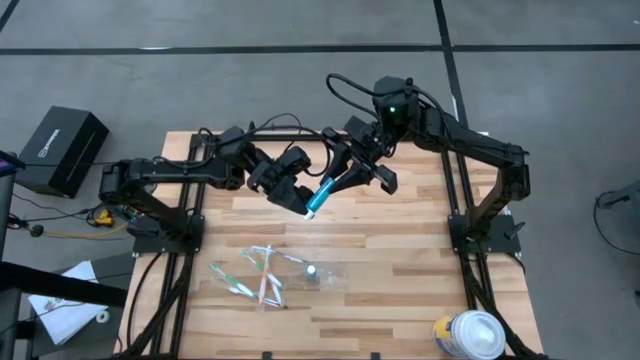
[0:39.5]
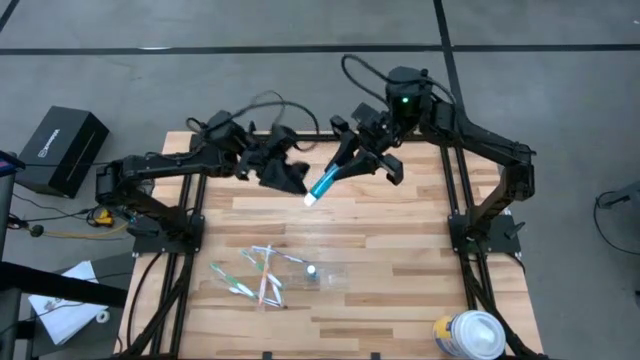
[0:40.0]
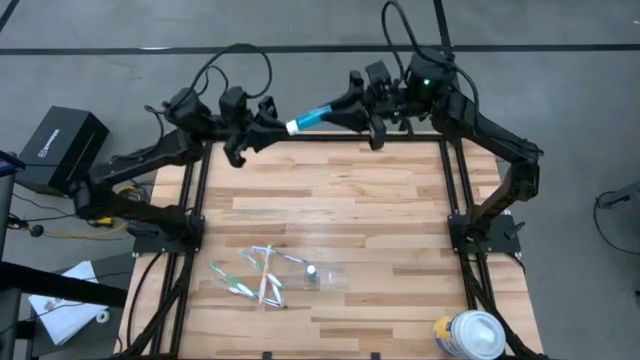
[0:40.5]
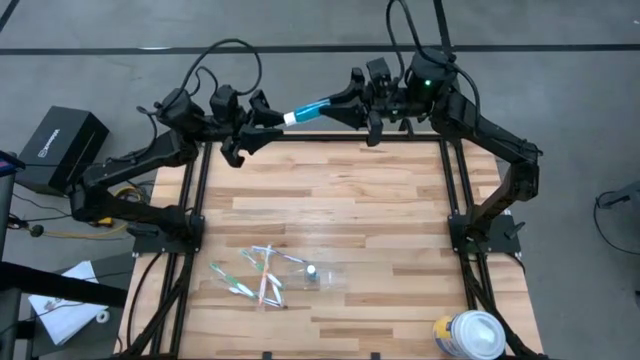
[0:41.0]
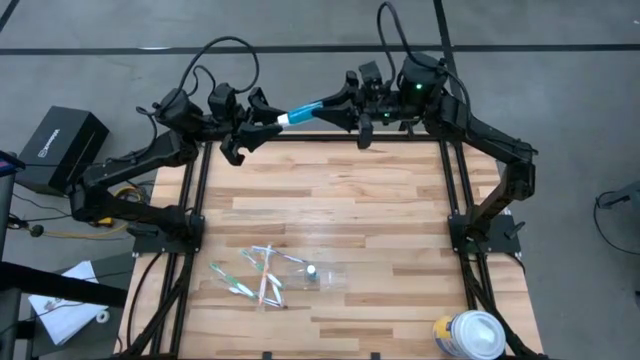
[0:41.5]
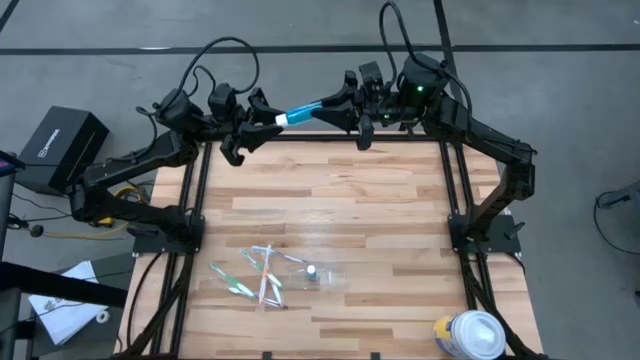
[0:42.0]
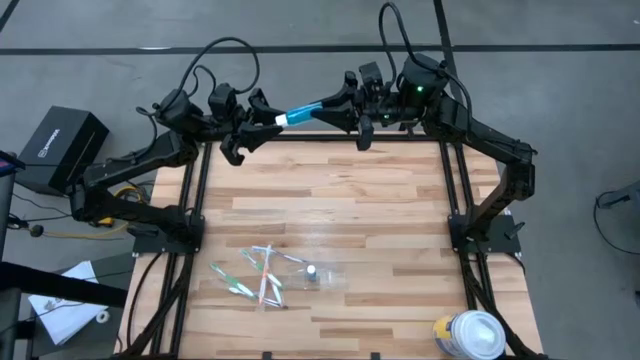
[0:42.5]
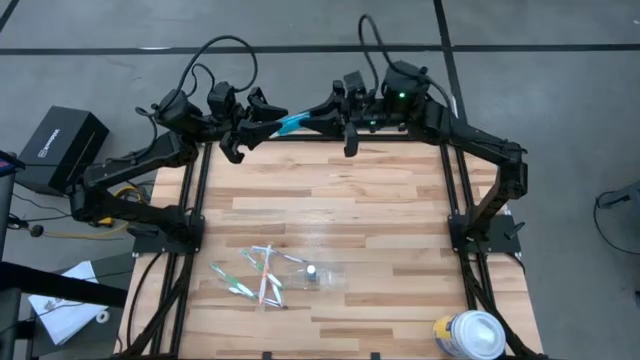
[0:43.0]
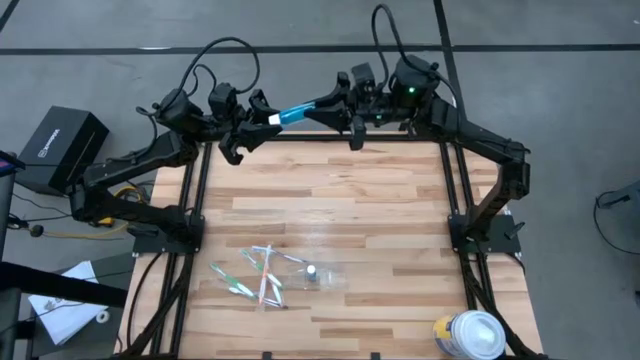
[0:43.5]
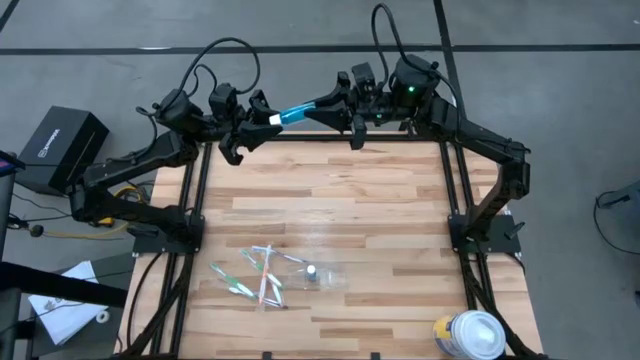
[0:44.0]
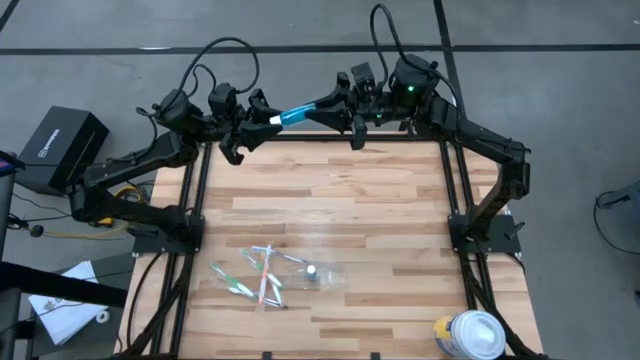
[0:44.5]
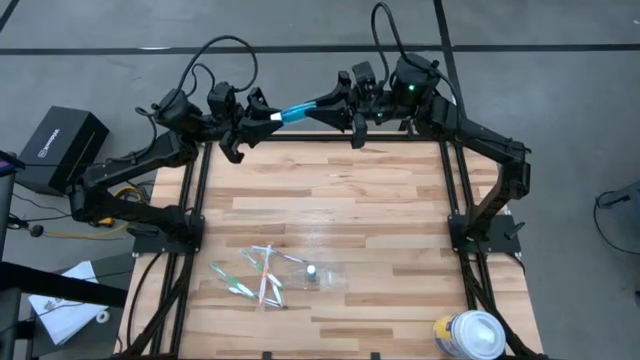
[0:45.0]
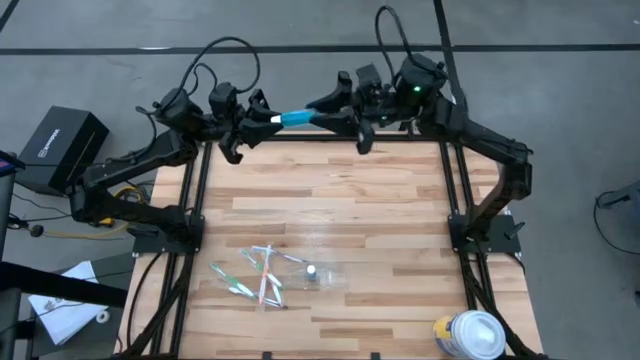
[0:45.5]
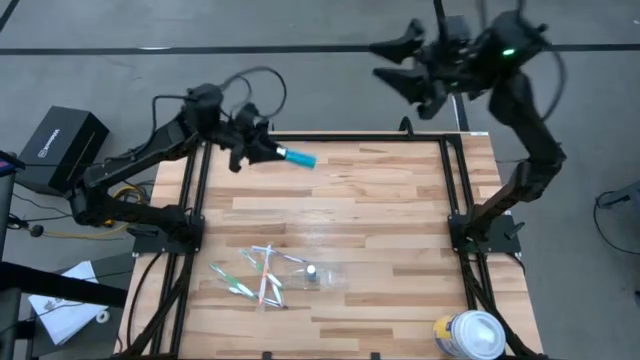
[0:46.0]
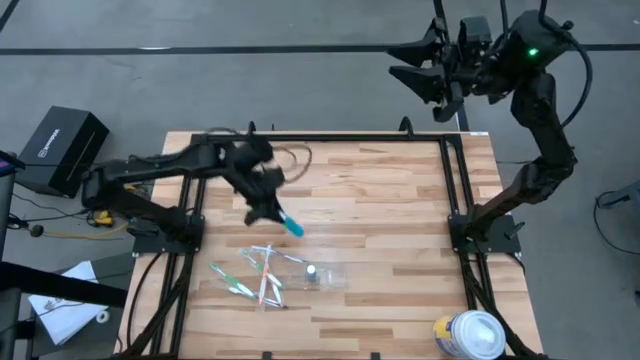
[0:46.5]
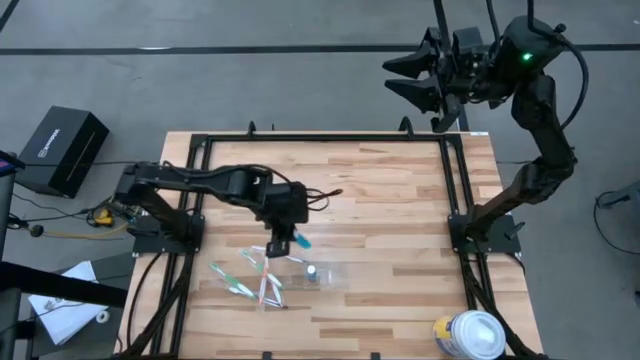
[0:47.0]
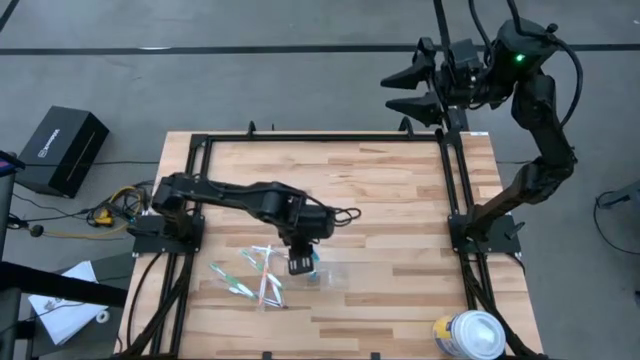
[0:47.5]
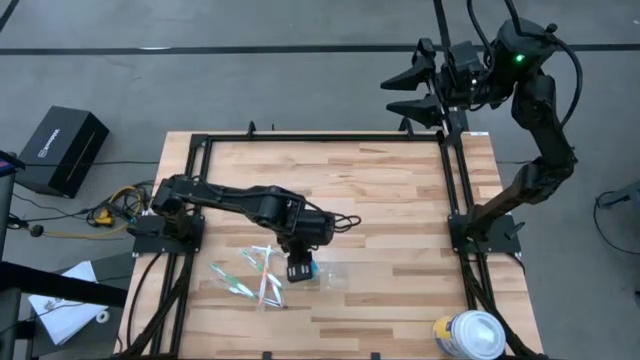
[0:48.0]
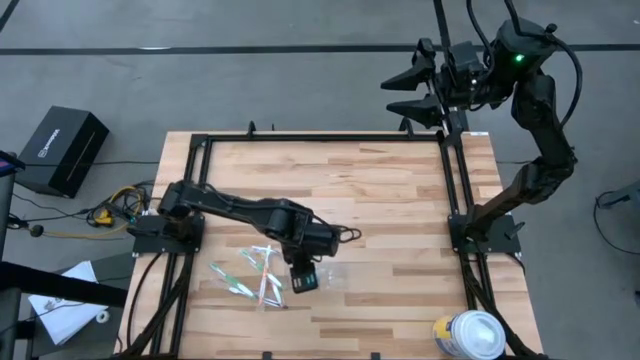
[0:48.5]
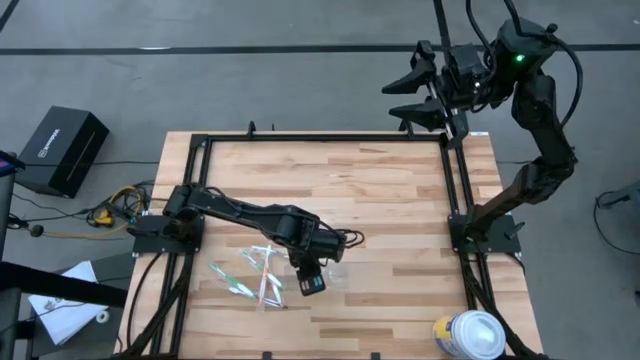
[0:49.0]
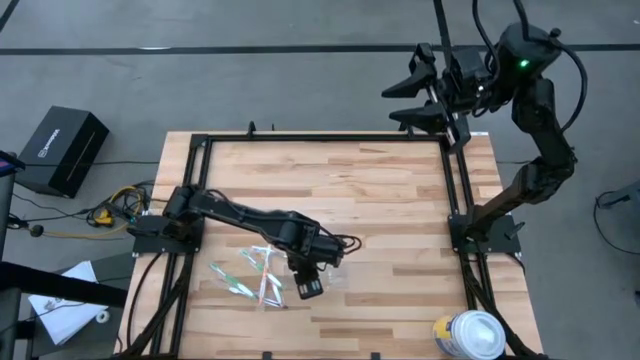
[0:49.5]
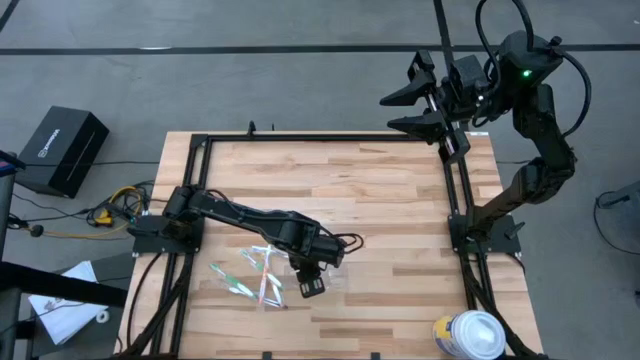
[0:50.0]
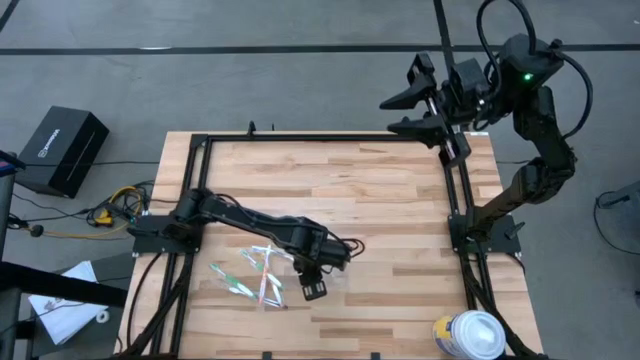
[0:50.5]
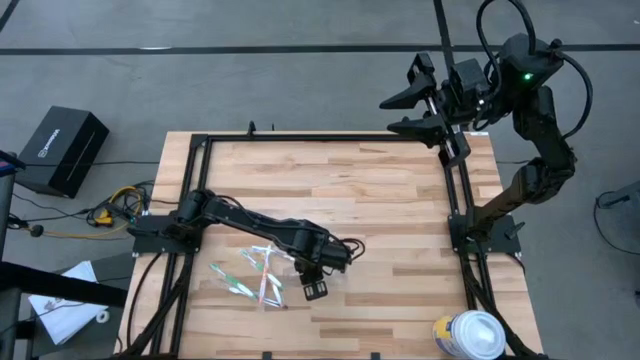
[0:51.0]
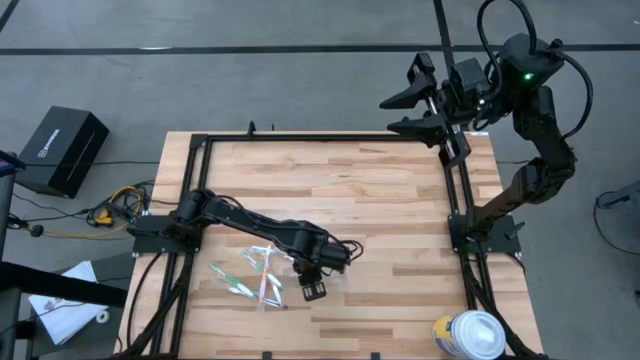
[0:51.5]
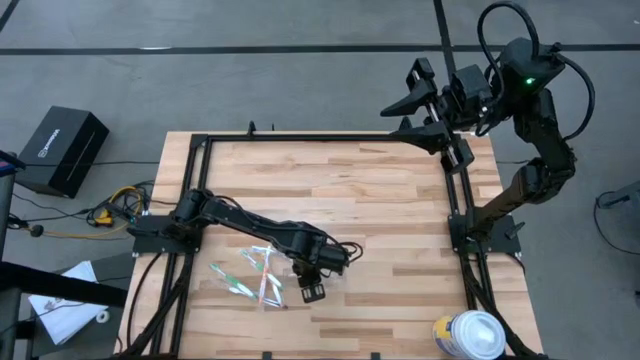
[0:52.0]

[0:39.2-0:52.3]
Task: Pick & Place toothbrushing station
Put the blue mouthwash into the transparent organizer

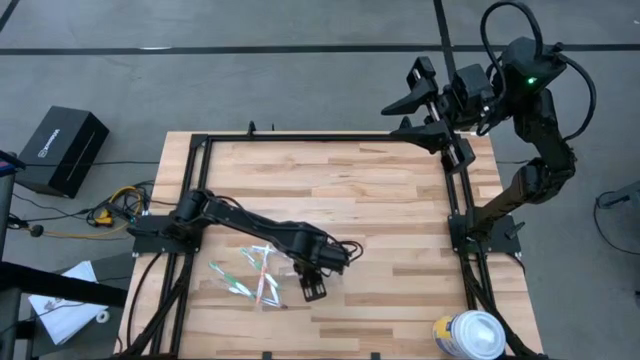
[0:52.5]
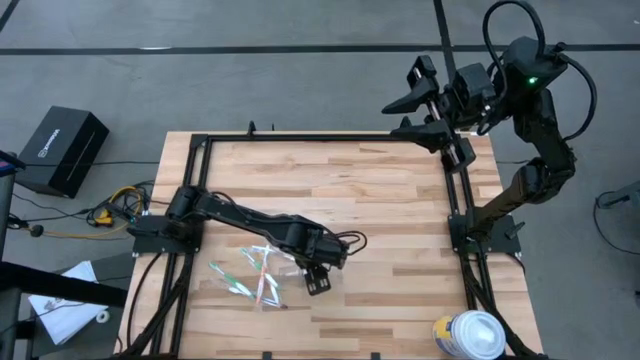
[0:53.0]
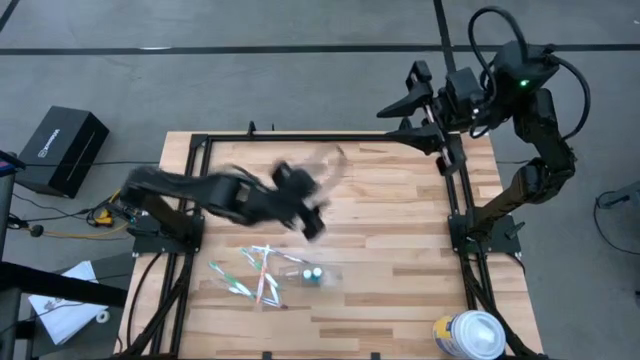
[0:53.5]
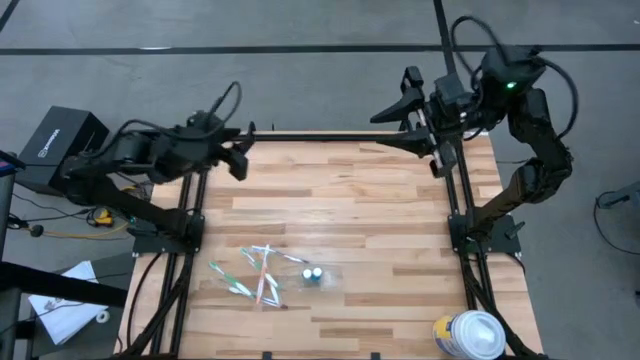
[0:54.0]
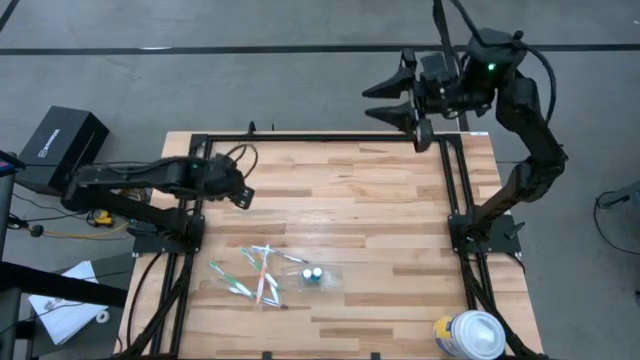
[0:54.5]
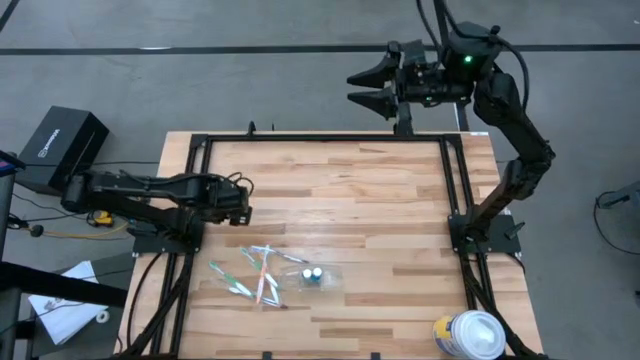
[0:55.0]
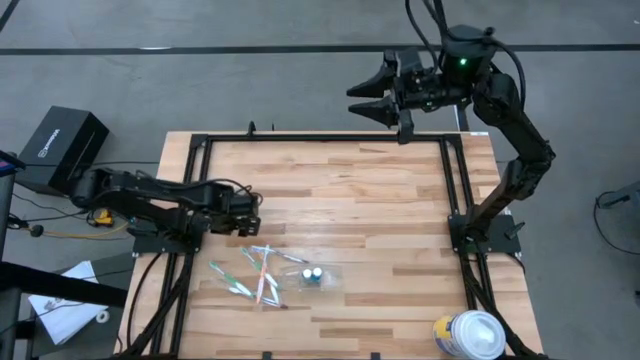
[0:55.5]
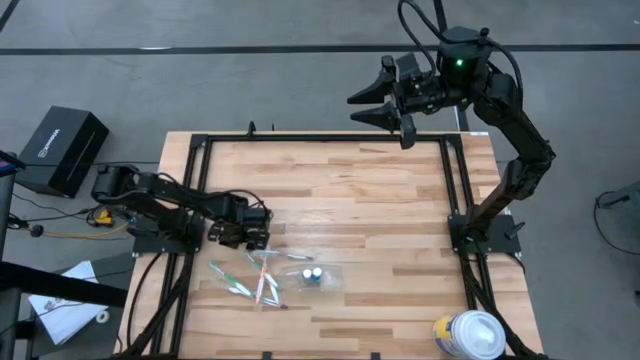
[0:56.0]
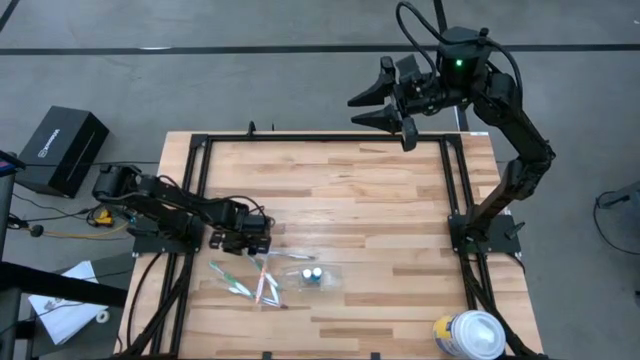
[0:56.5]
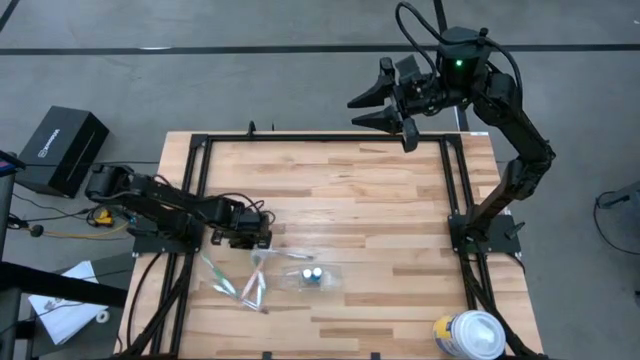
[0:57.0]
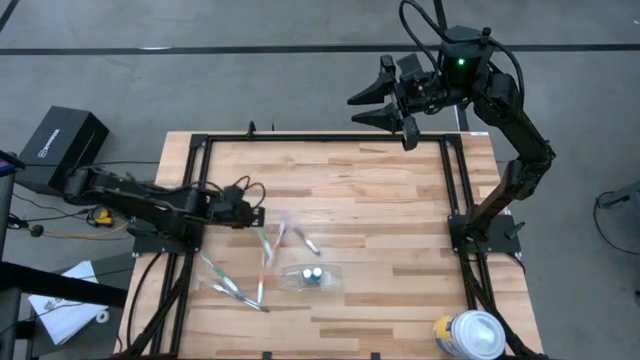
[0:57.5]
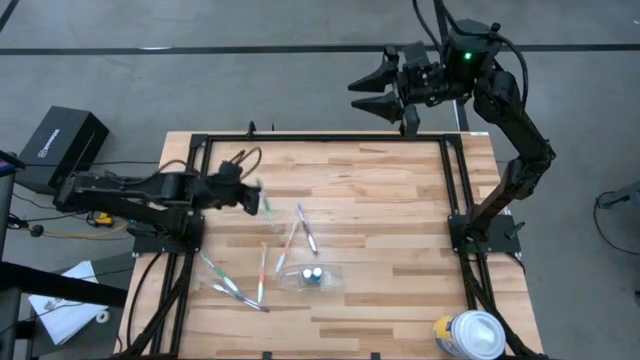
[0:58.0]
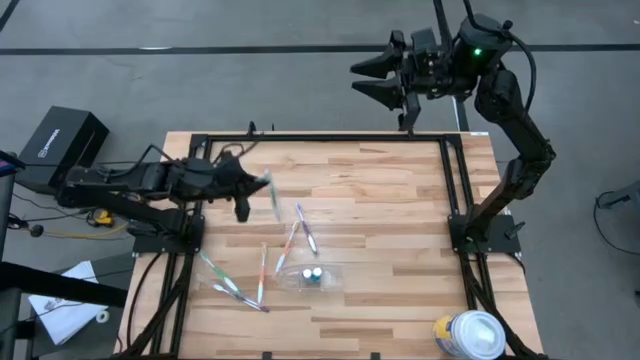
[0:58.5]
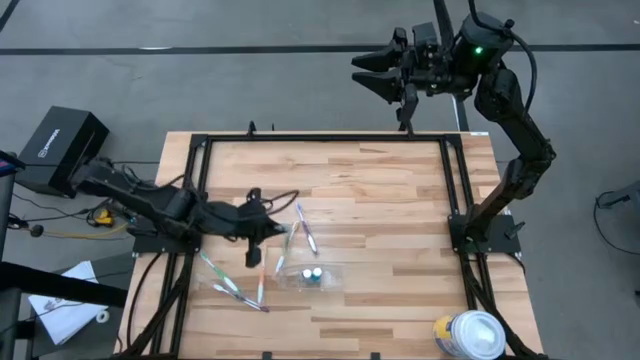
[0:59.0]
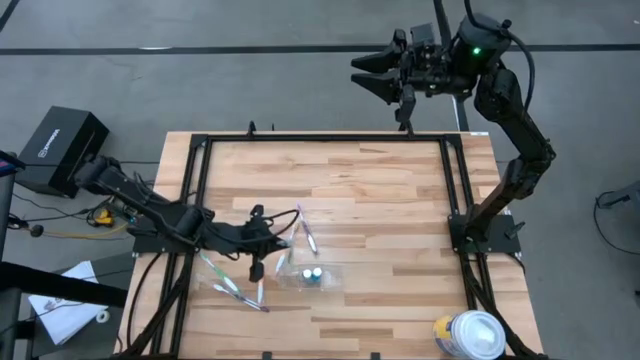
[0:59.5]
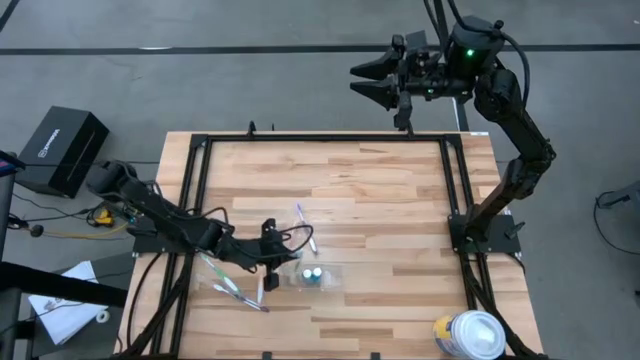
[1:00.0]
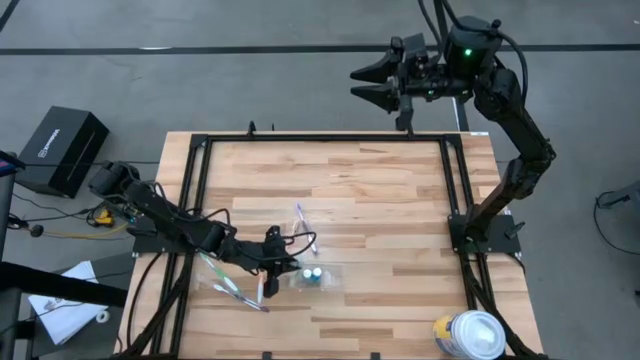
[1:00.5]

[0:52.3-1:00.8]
Put the green toothbrush into the transparent organizer
